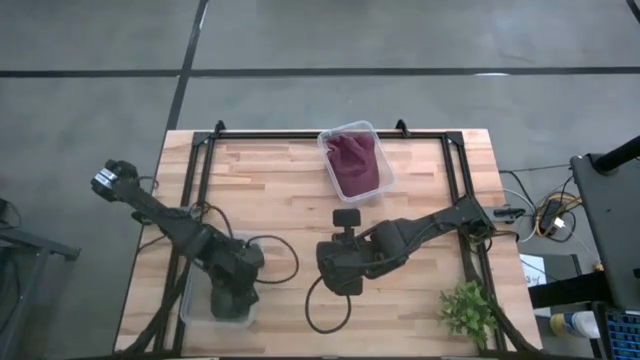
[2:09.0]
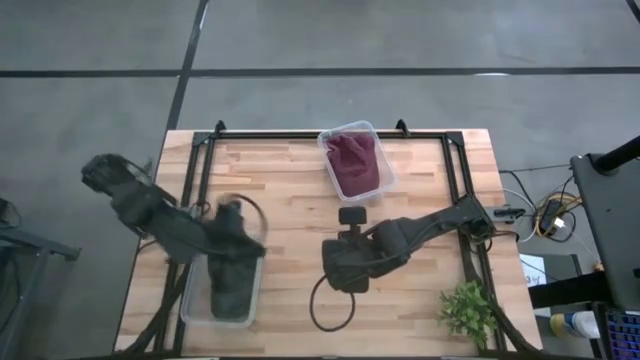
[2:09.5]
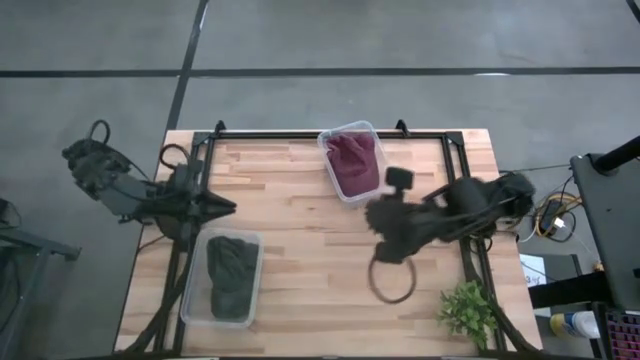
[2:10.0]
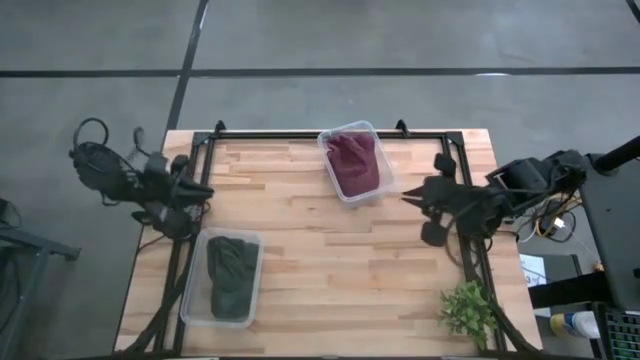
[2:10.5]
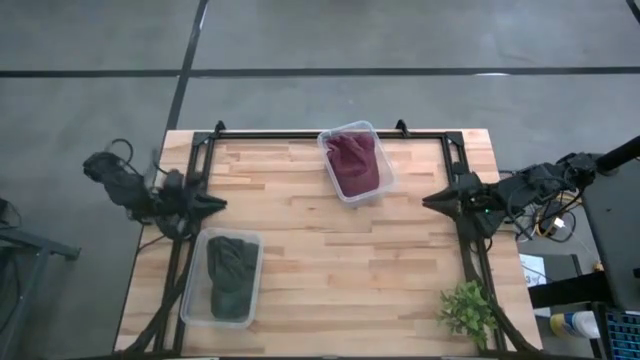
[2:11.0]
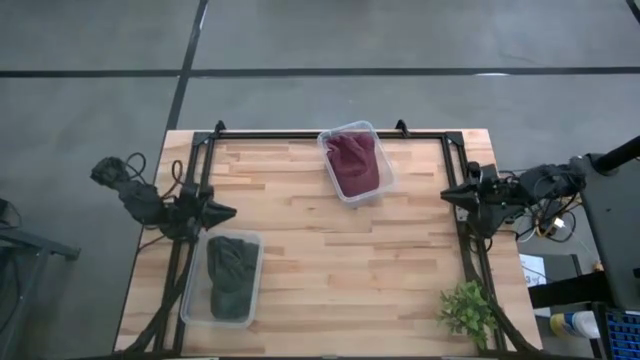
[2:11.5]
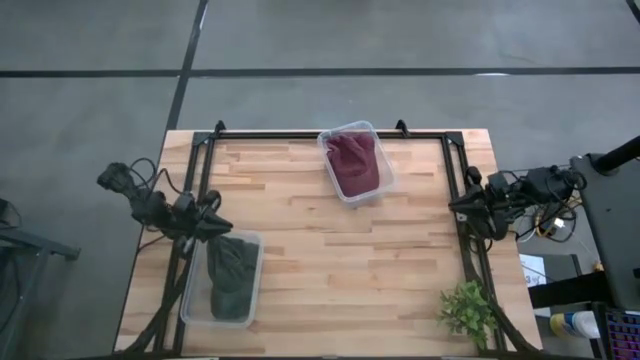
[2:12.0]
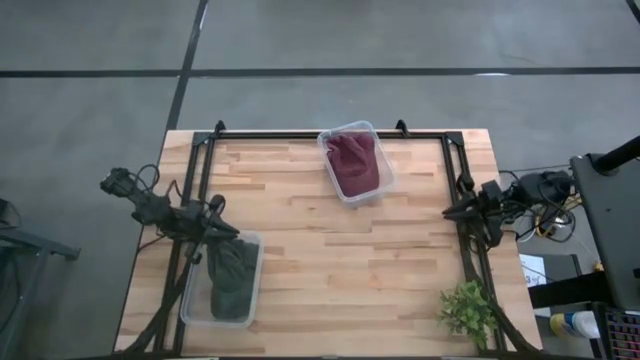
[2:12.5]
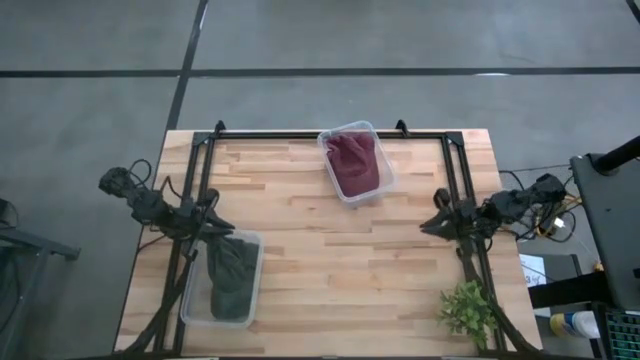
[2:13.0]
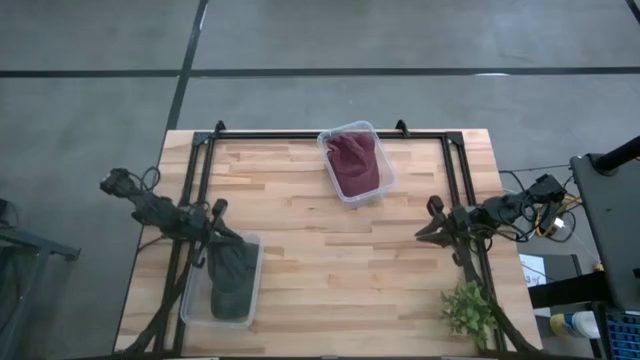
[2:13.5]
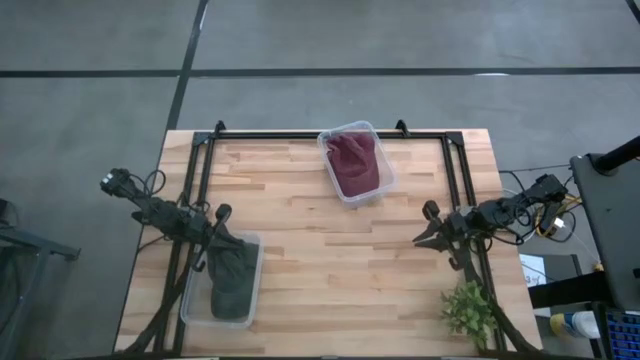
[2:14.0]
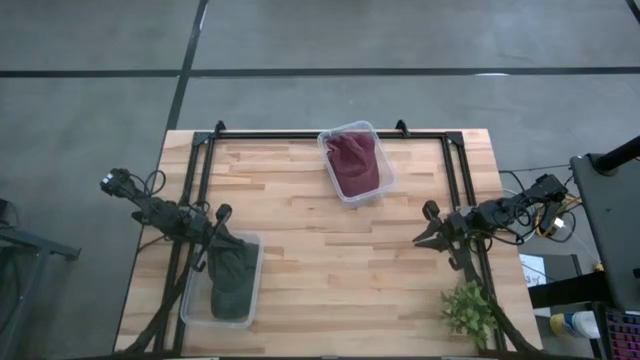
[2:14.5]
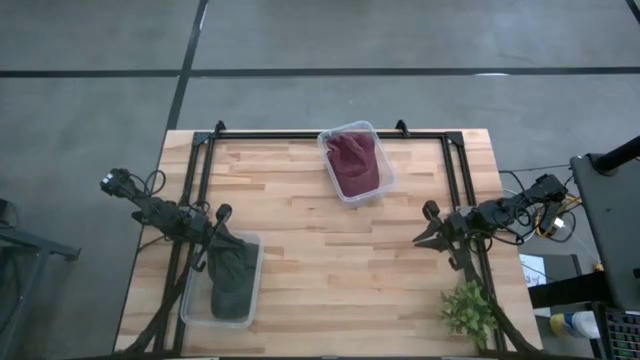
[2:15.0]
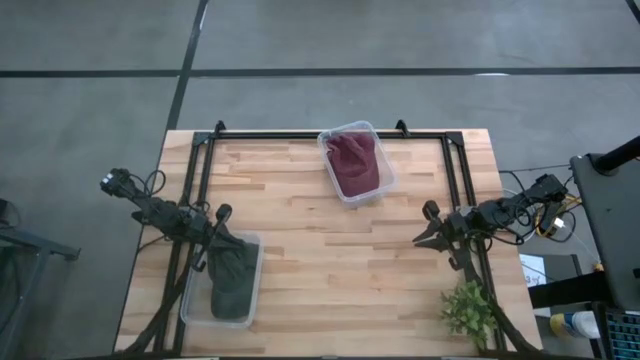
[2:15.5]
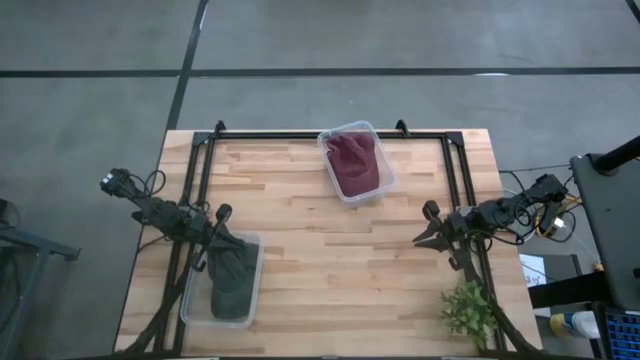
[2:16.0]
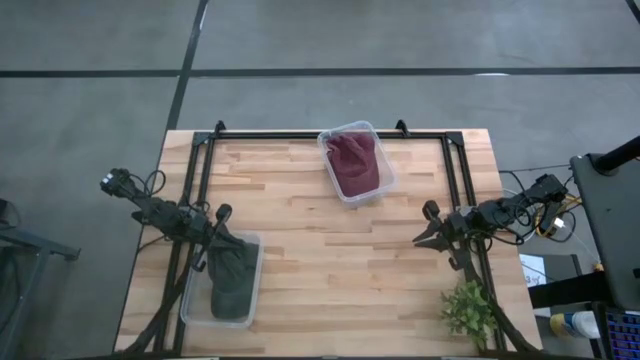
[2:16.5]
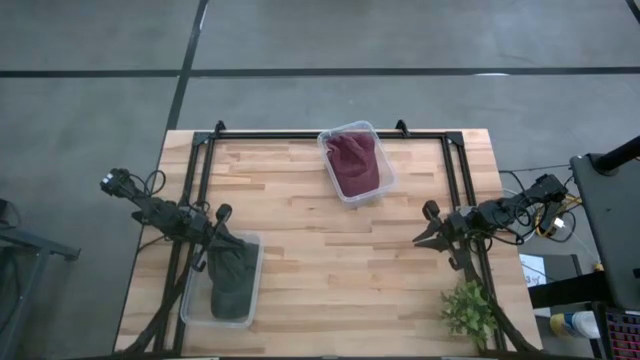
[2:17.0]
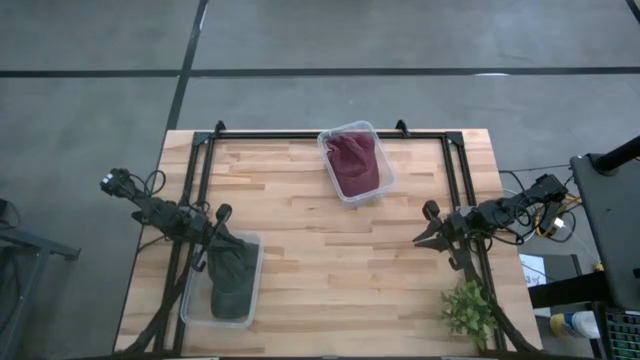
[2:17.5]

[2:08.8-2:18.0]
Task: Pick & Place hat
Return to Home Position

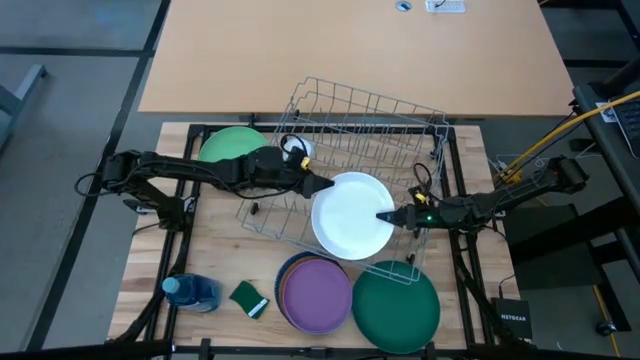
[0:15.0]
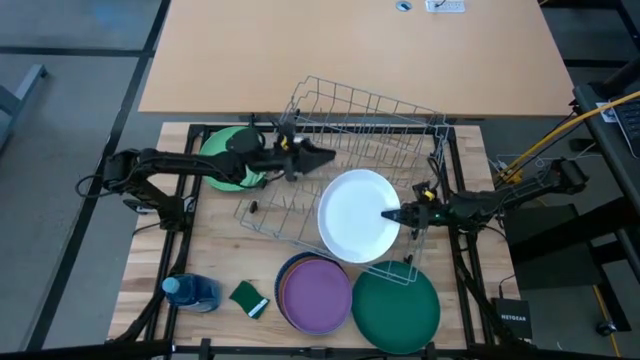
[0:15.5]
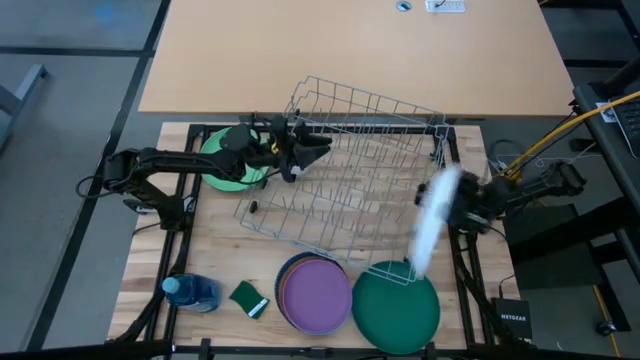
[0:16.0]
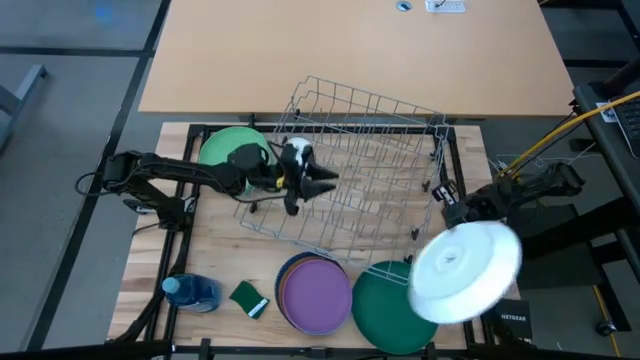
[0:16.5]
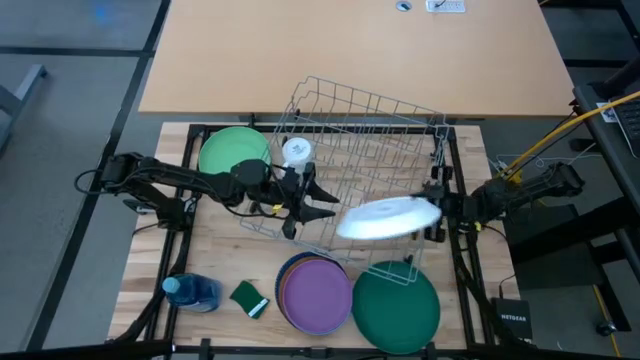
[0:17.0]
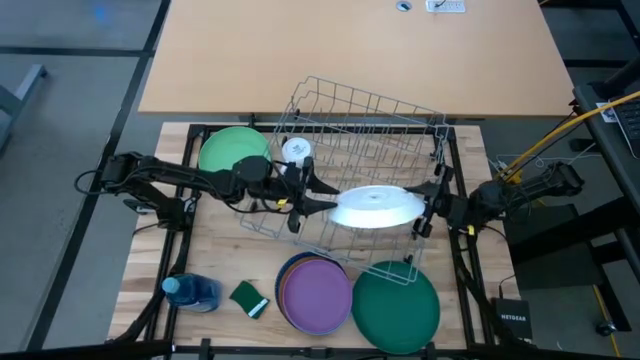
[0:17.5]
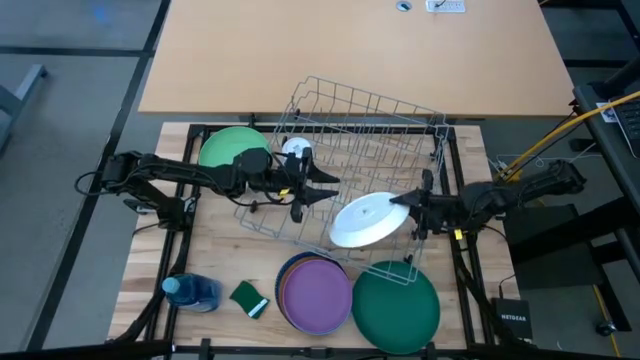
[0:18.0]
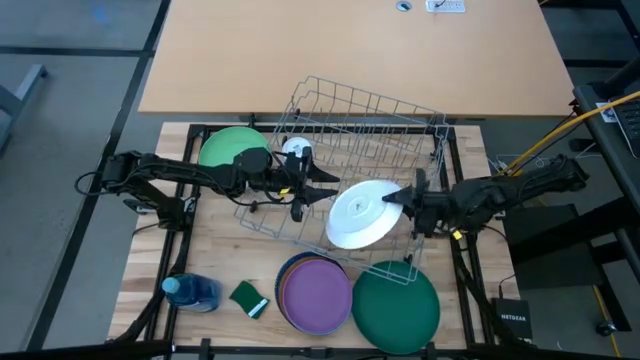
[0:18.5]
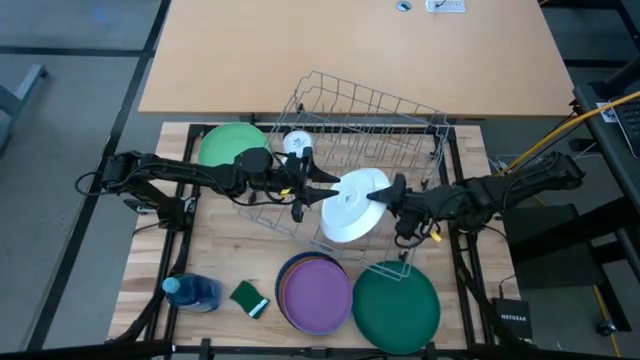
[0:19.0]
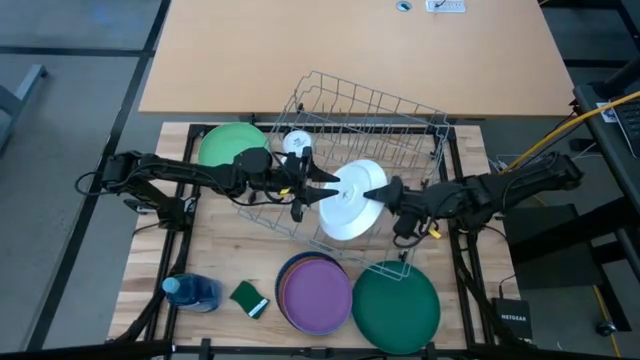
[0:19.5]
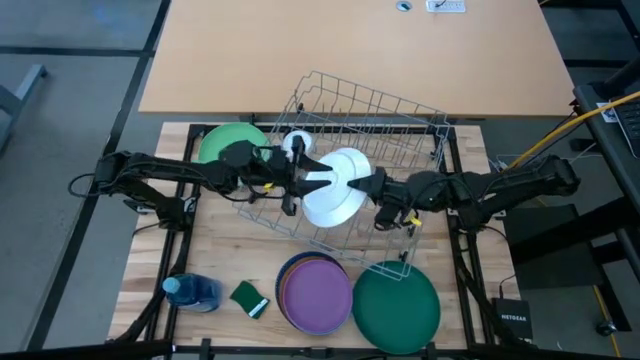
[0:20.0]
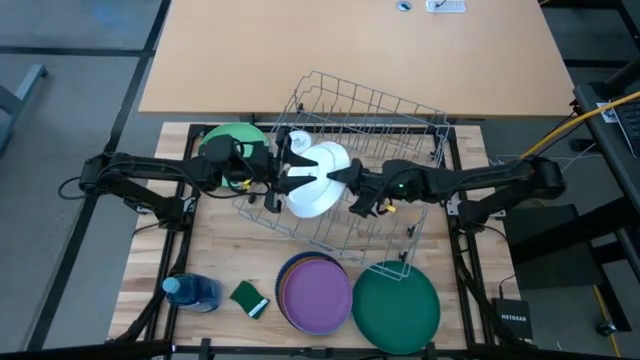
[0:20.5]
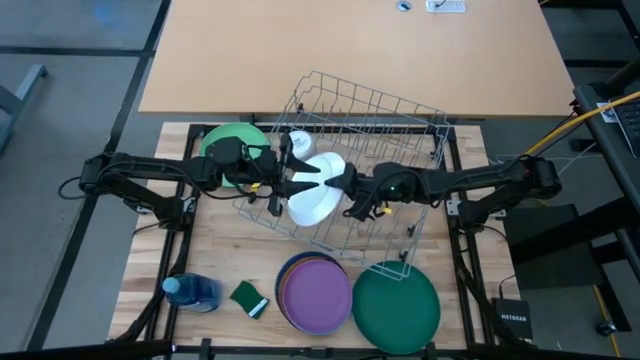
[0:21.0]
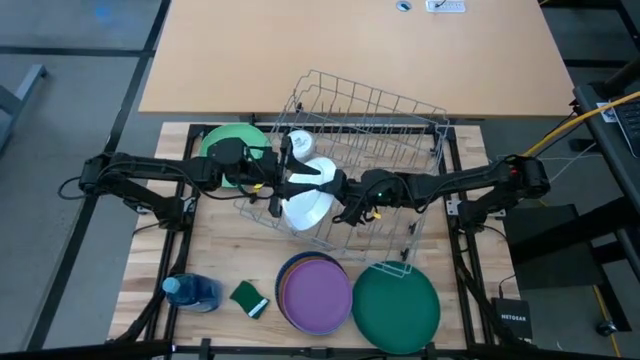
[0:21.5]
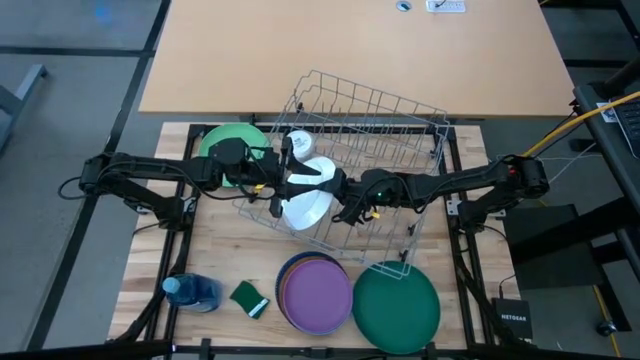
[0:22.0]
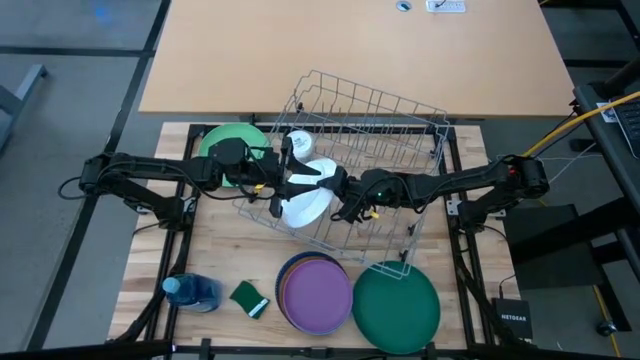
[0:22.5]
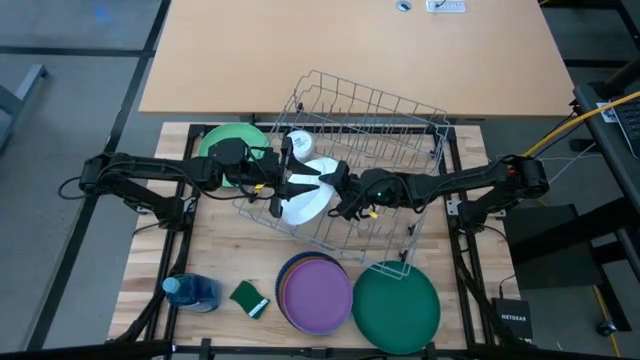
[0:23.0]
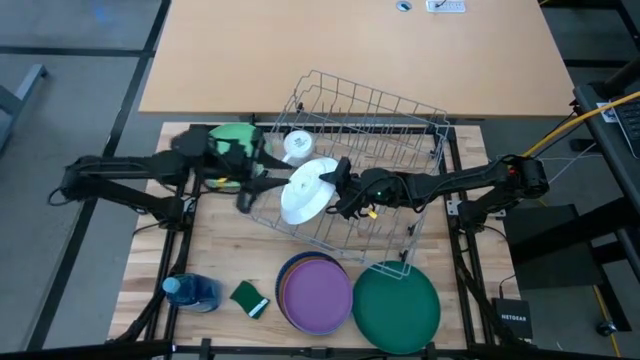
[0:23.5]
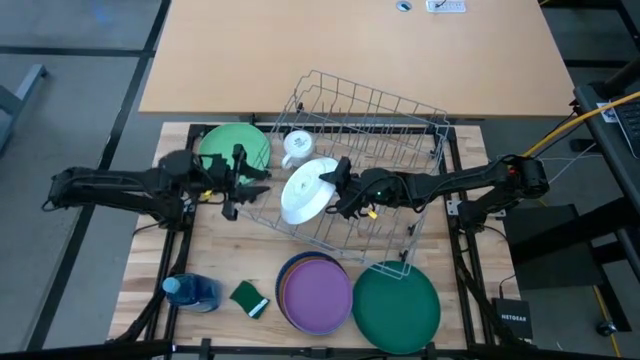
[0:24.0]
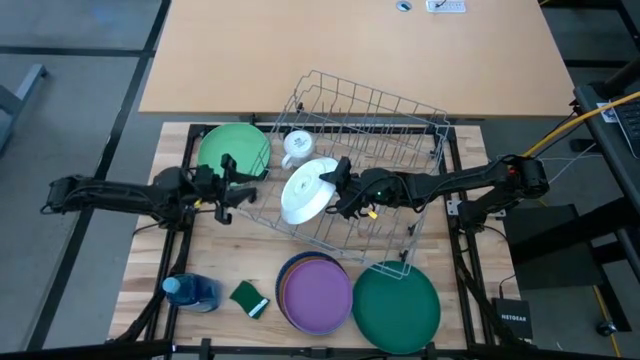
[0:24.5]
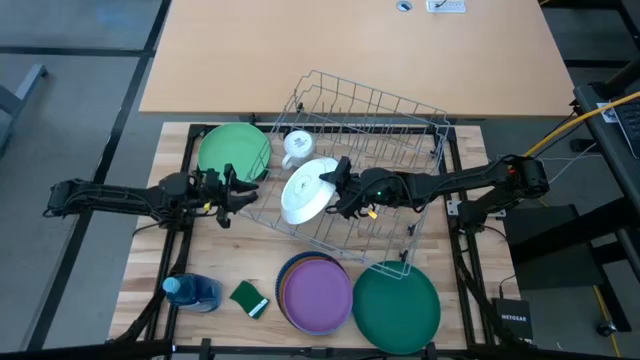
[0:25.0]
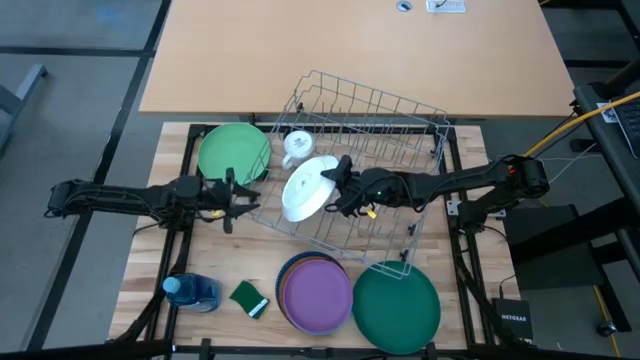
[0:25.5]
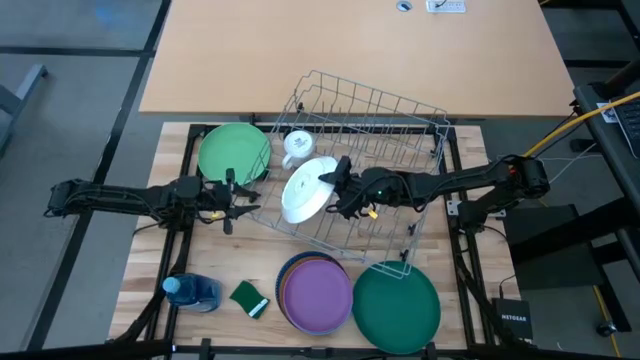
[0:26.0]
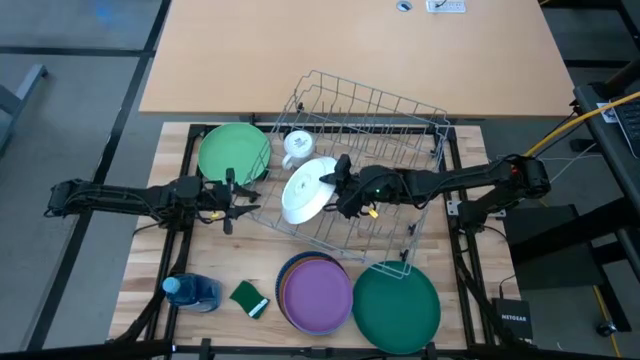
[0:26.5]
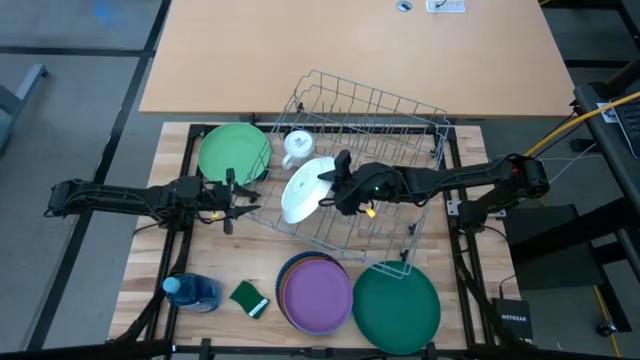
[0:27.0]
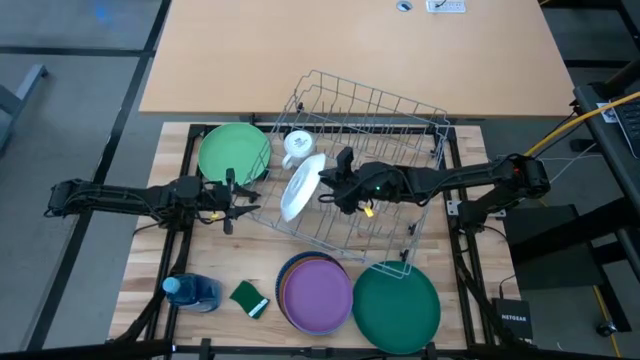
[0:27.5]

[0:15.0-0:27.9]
Task: Sort dishes
Put the white plate in the dish rack
